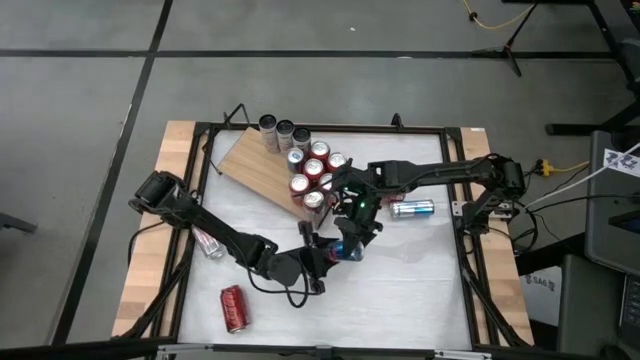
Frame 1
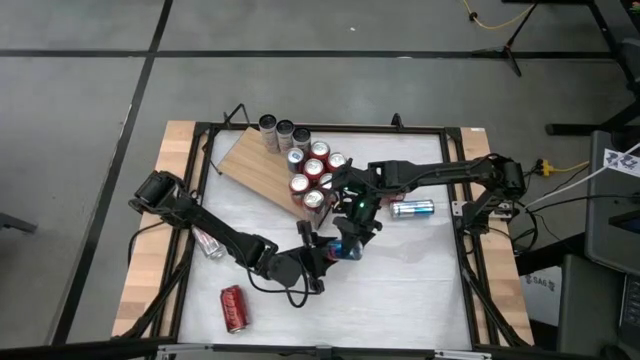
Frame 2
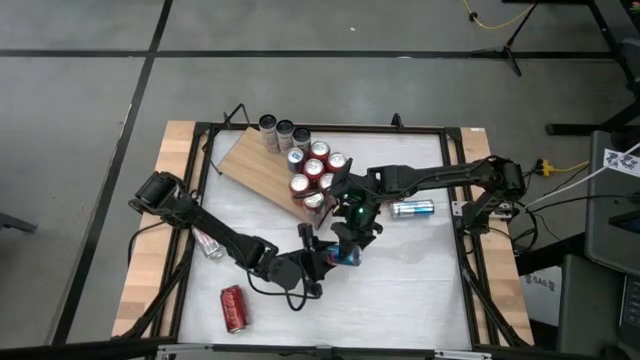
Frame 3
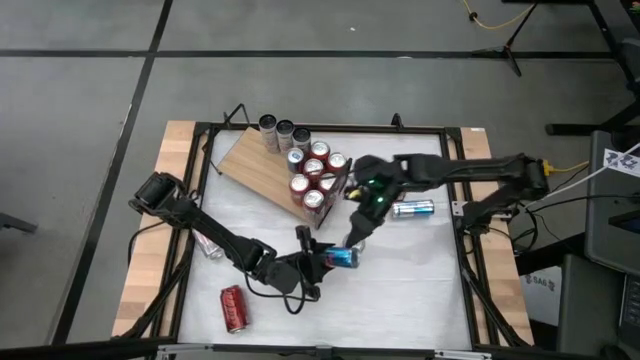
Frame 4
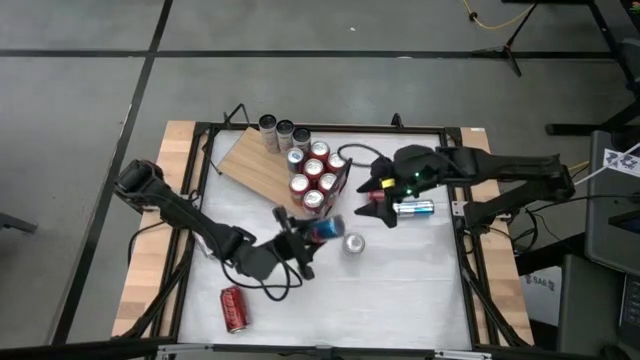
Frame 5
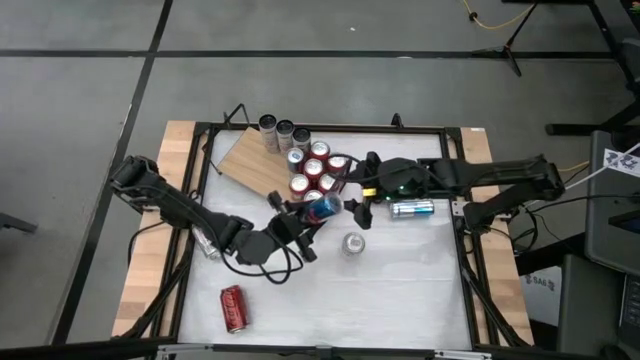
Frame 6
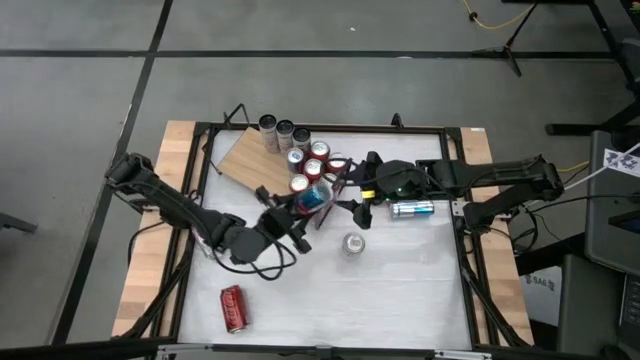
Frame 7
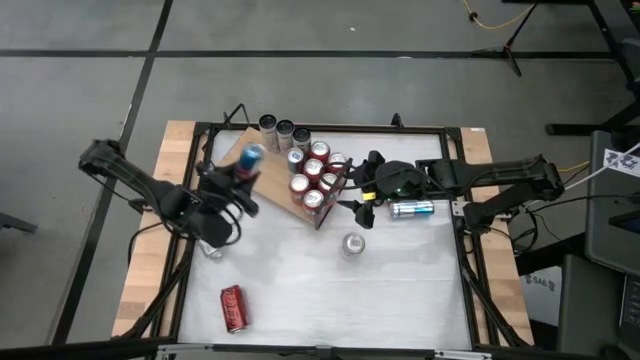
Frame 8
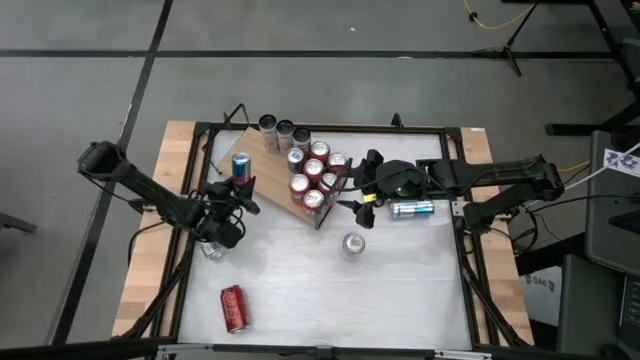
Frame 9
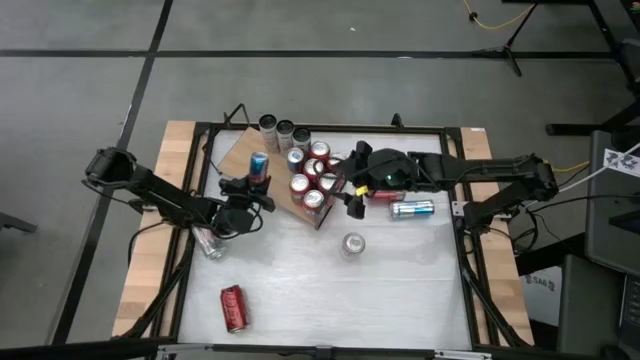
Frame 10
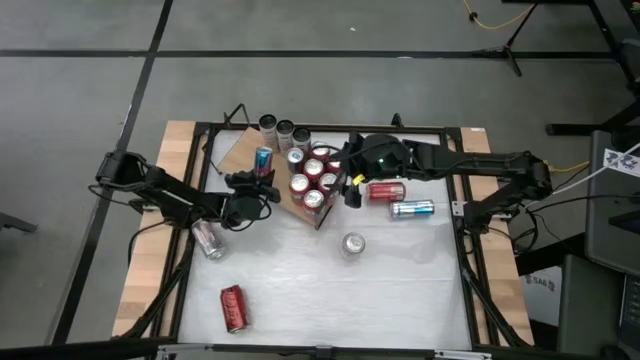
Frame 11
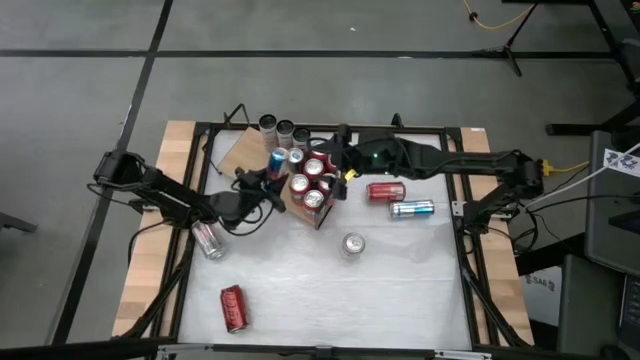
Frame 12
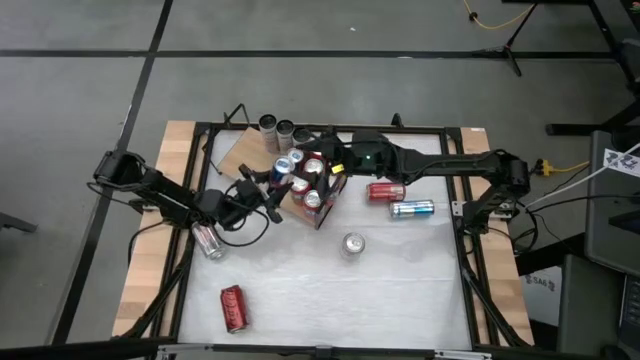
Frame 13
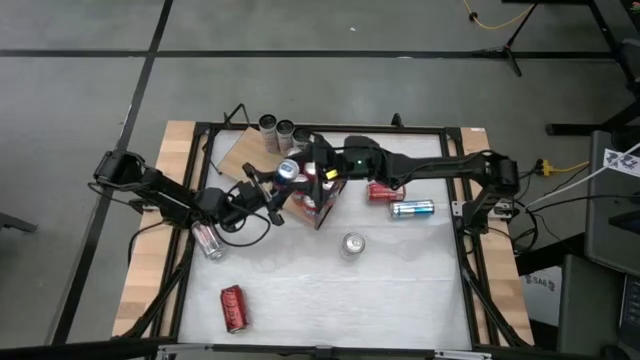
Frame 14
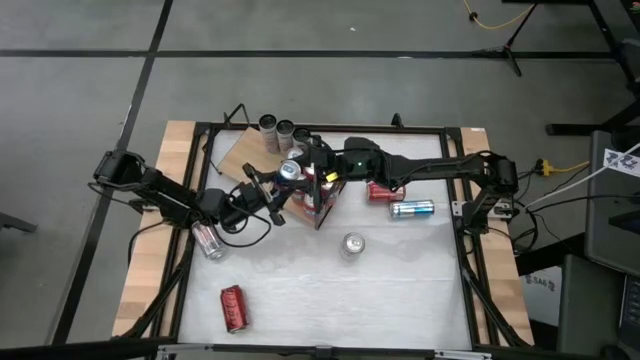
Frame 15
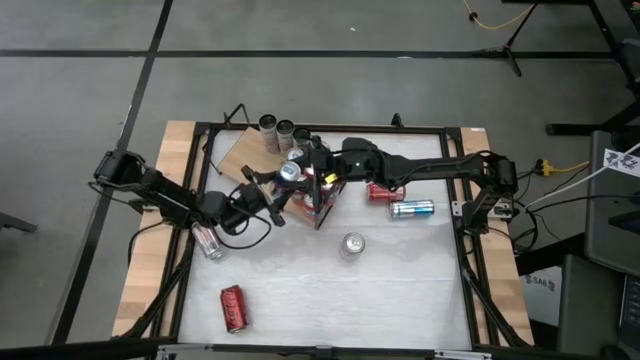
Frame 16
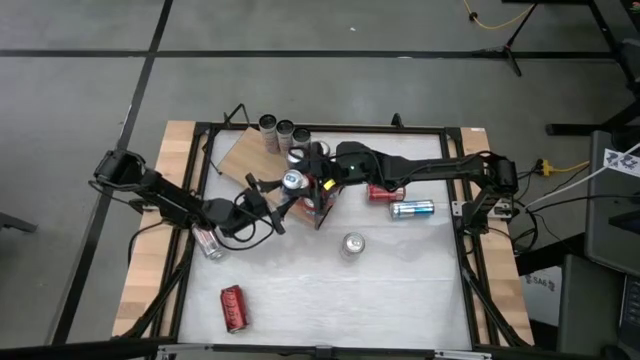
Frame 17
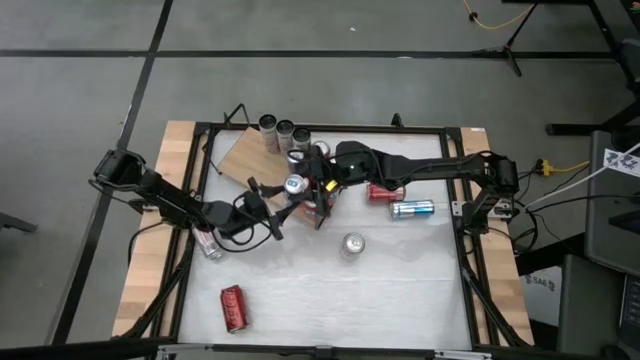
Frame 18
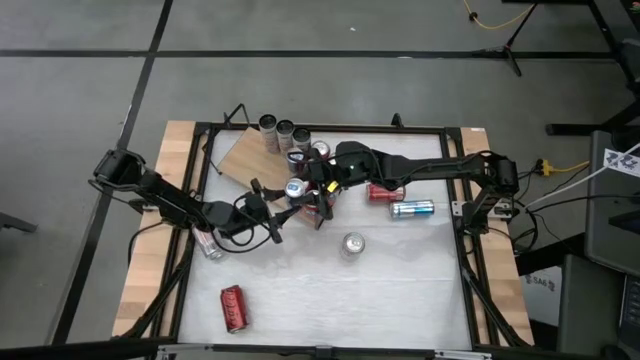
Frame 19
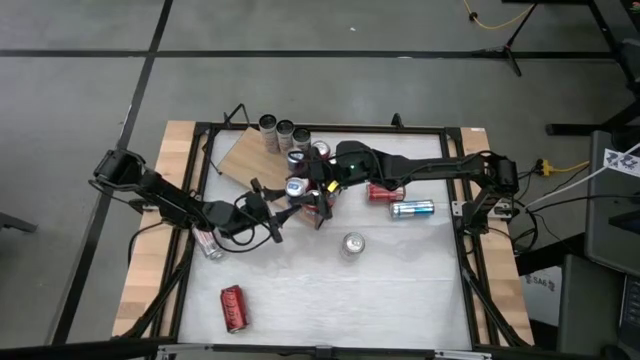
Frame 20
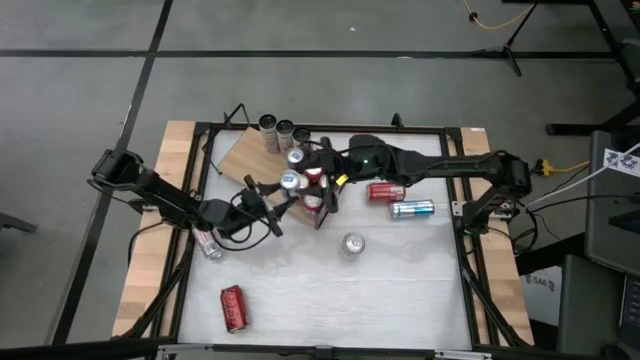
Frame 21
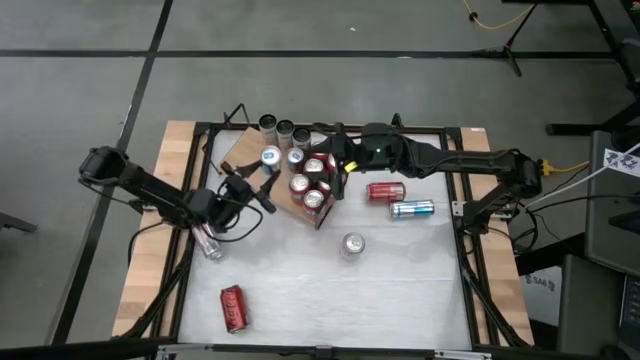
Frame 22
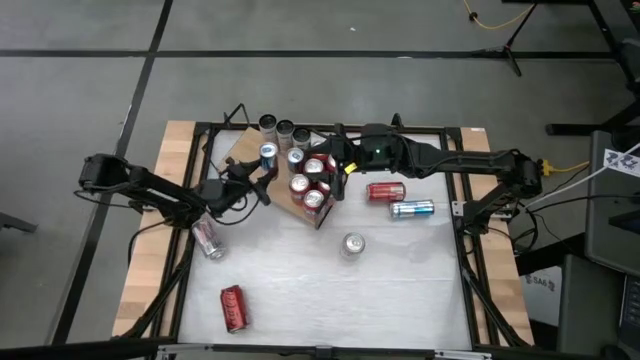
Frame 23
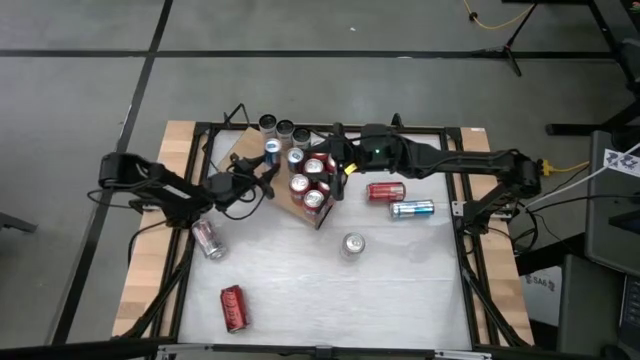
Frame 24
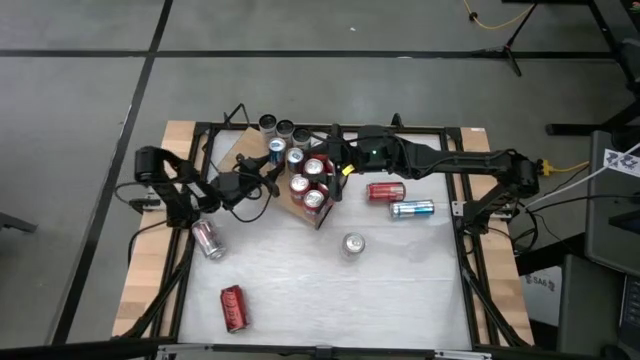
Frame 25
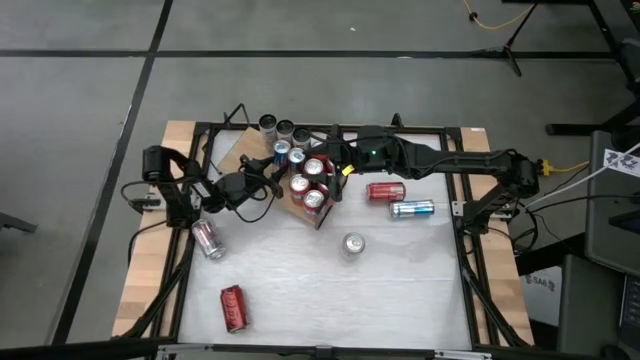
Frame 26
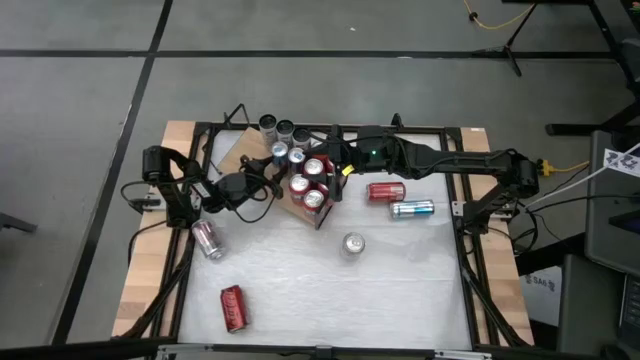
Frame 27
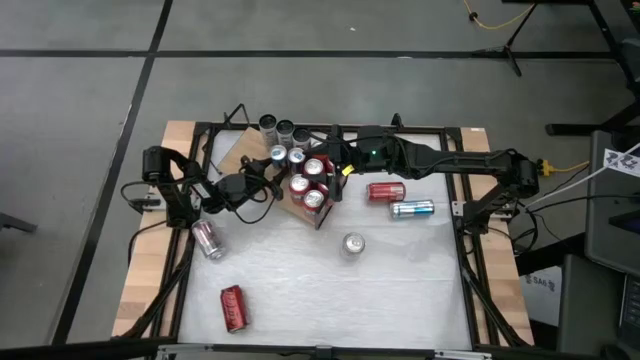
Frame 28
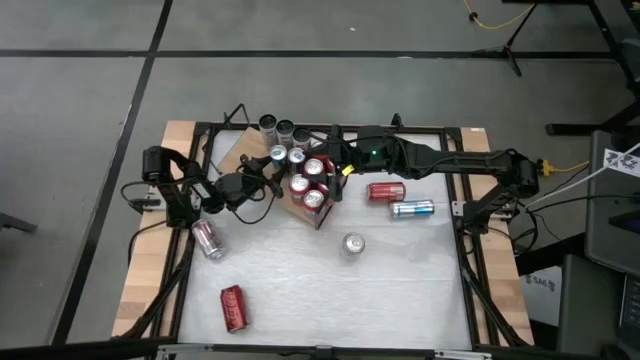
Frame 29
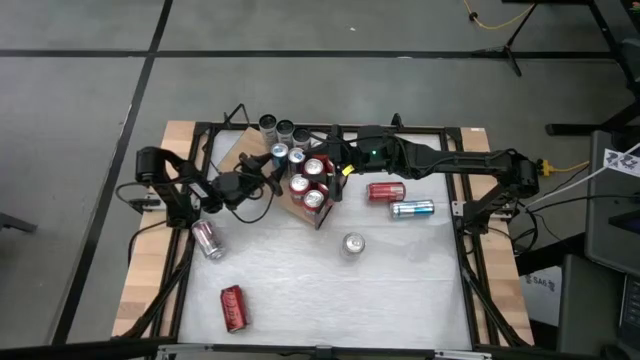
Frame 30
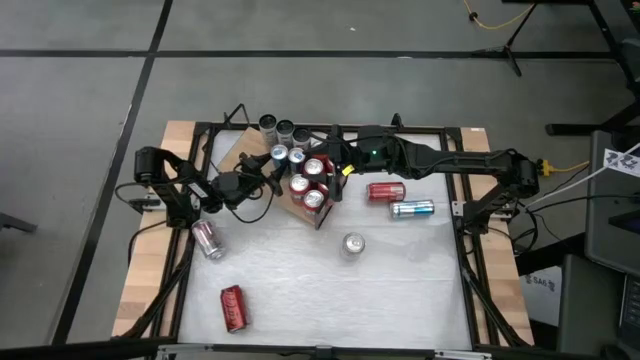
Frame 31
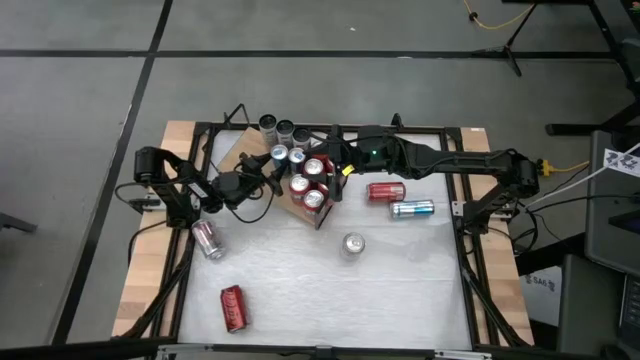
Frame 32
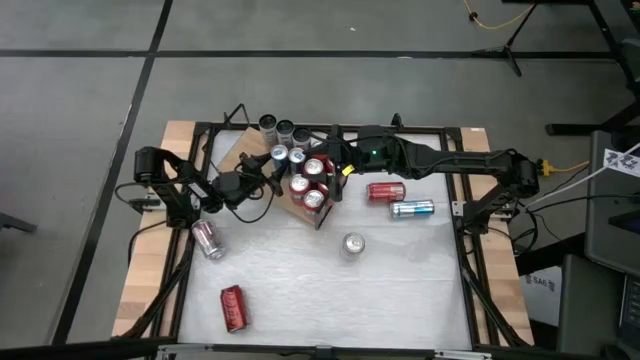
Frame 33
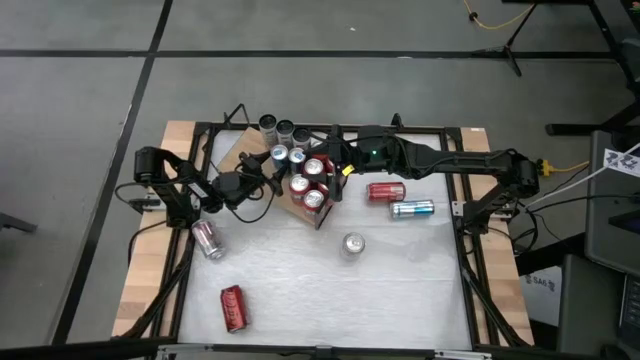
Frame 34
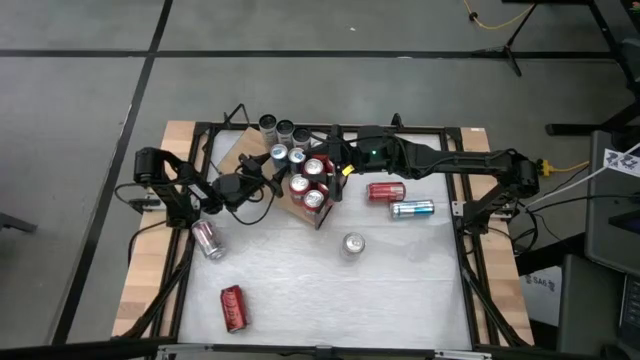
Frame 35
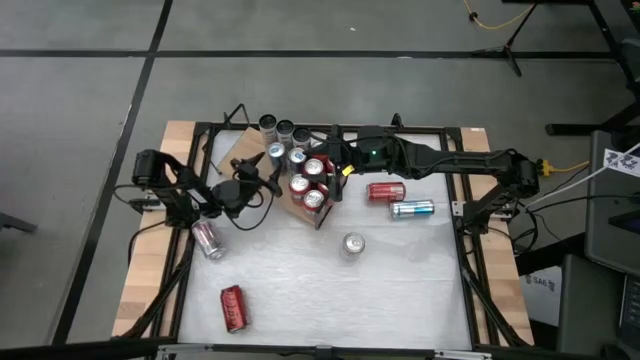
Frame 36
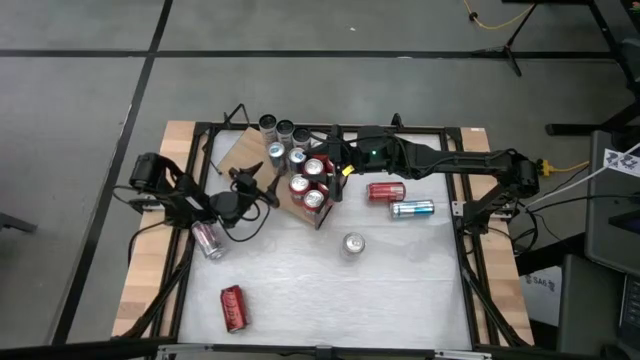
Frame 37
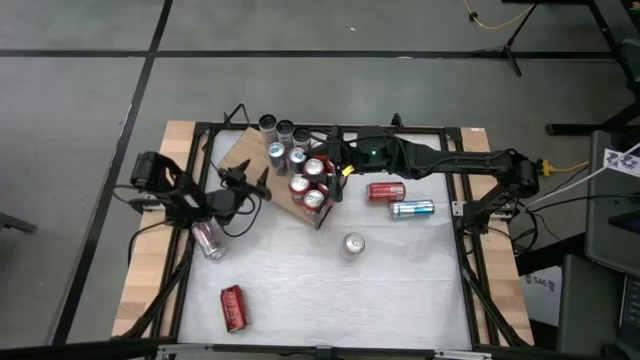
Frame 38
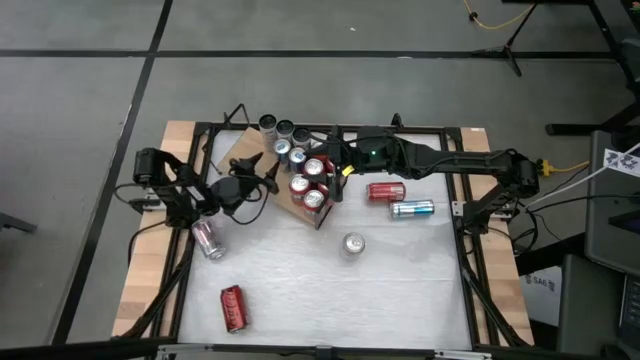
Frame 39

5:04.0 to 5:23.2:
Task: Pick and place cans onto a shelf
Put the bottom blue and white soda can on the shelf aligned with the other blue and white soda cans

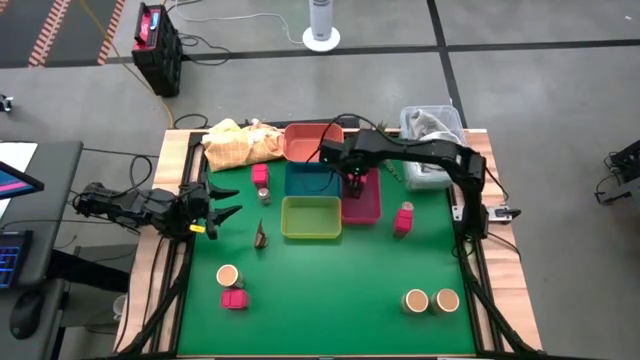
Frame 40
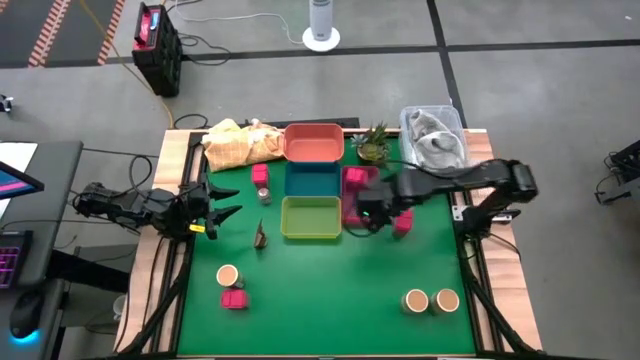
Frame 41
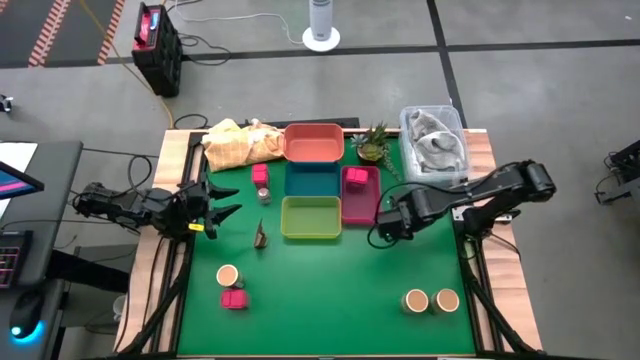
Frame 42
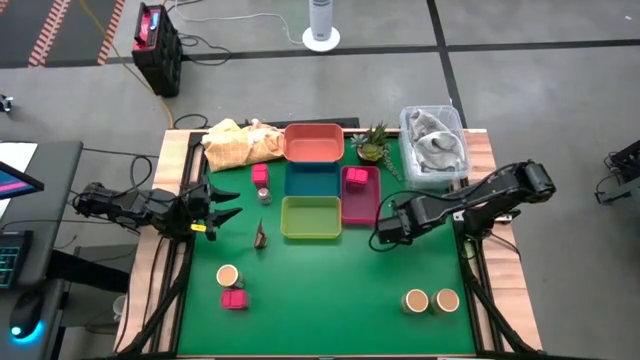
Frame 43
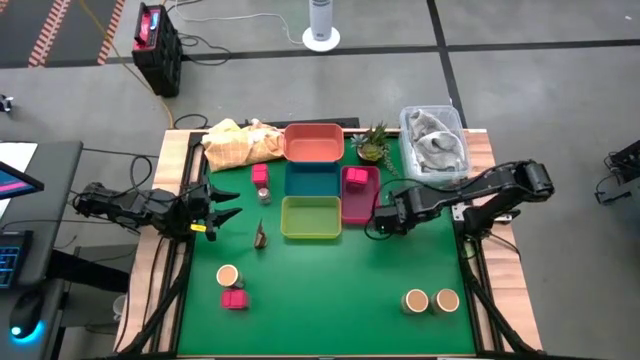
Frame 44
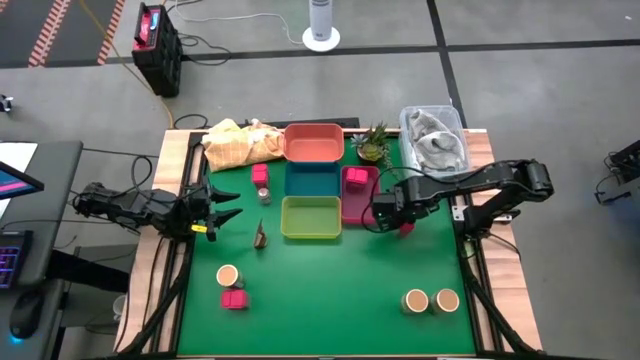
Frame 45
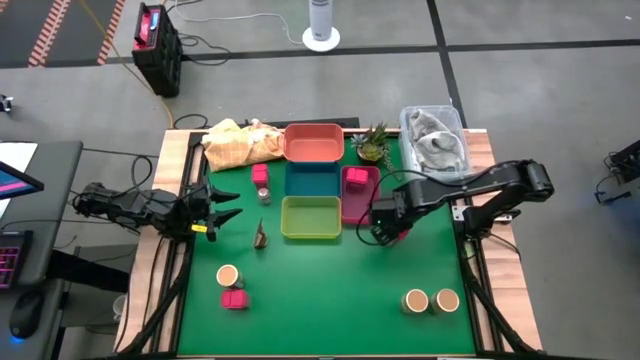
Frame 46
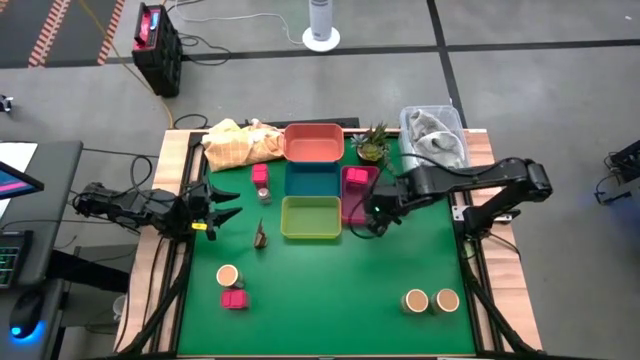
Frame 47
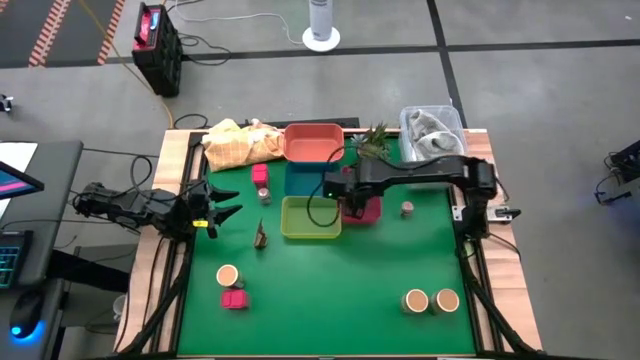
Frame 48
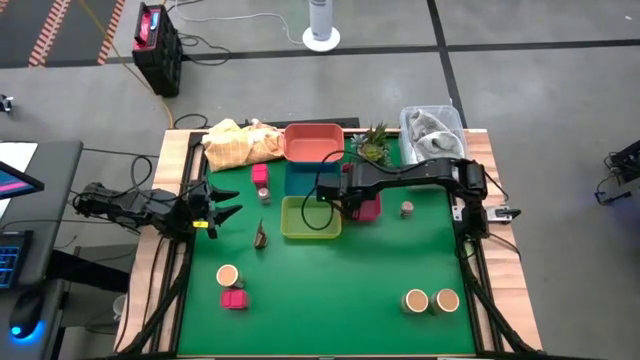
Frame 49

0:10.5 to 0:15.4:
Task: Sort spices by type
Put the right red seasoning can into the red bin
